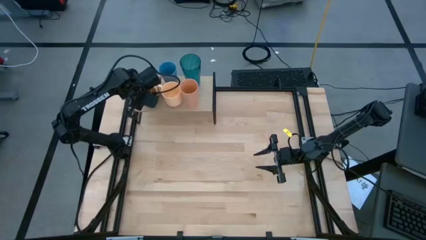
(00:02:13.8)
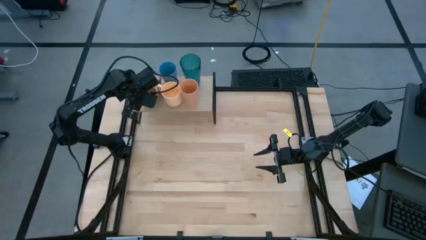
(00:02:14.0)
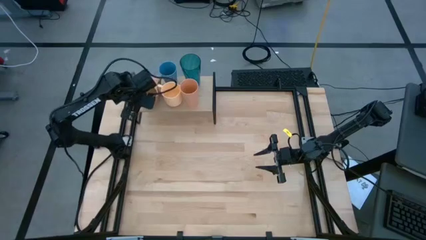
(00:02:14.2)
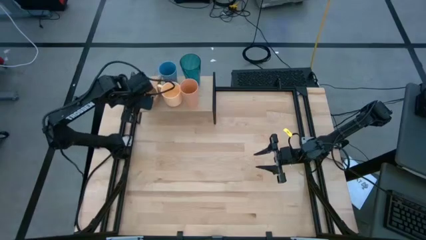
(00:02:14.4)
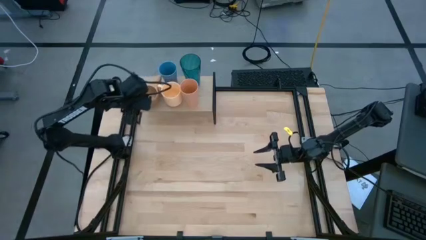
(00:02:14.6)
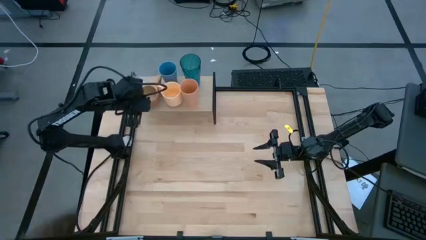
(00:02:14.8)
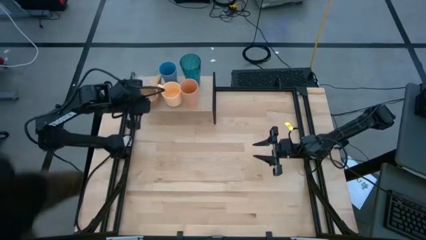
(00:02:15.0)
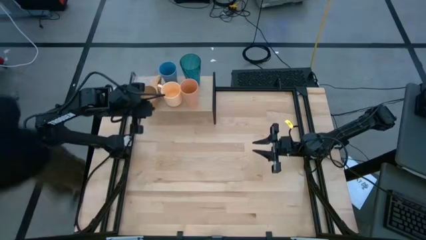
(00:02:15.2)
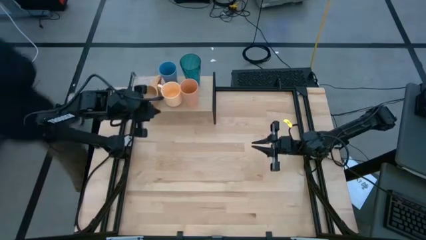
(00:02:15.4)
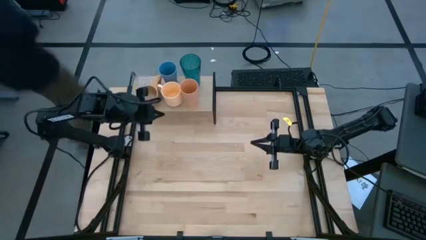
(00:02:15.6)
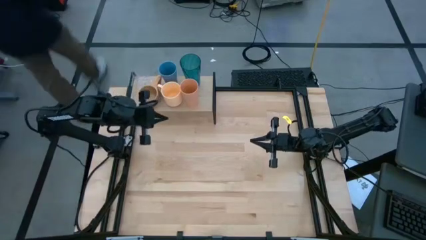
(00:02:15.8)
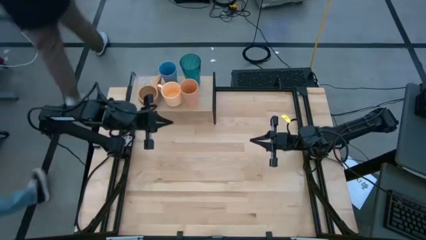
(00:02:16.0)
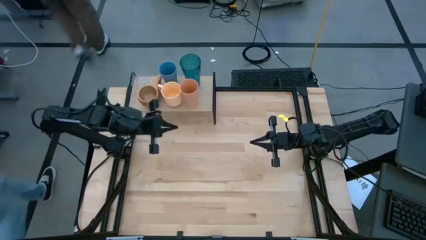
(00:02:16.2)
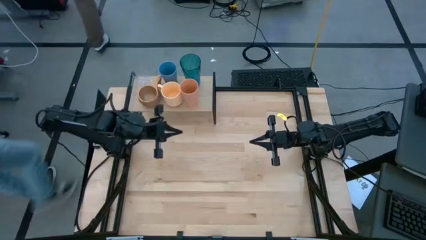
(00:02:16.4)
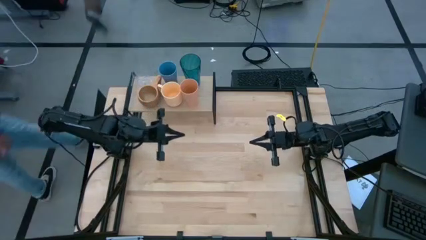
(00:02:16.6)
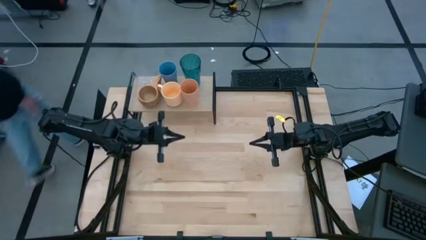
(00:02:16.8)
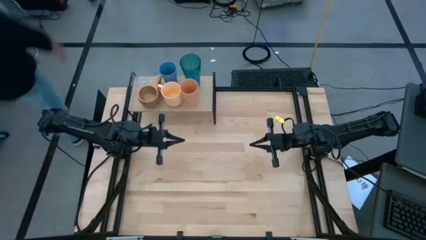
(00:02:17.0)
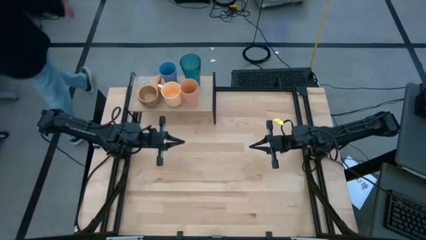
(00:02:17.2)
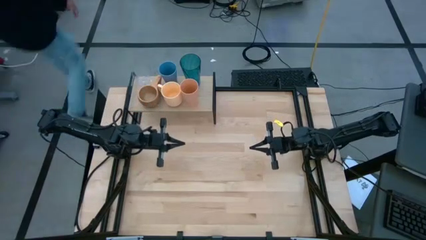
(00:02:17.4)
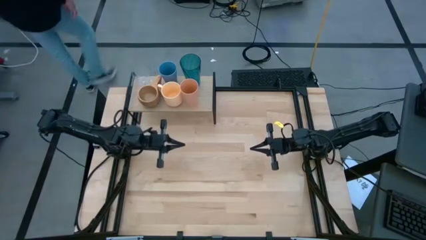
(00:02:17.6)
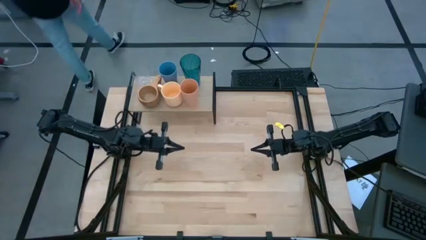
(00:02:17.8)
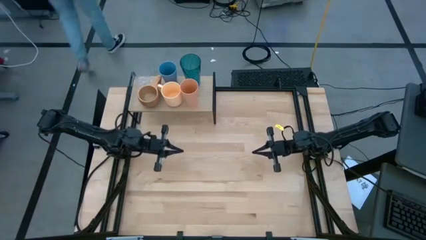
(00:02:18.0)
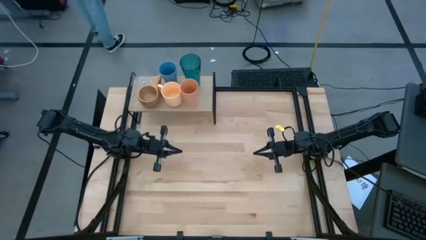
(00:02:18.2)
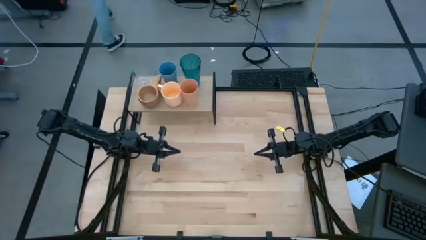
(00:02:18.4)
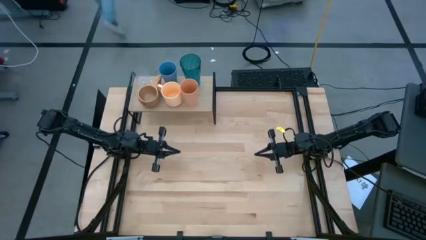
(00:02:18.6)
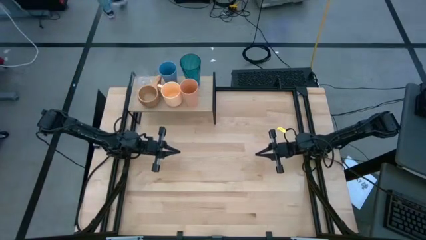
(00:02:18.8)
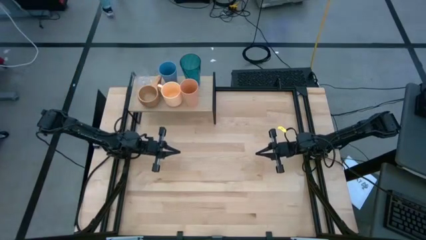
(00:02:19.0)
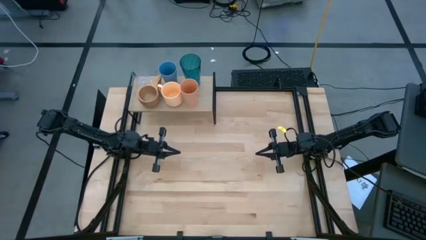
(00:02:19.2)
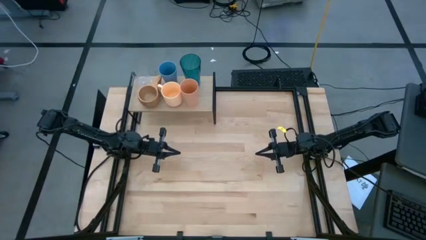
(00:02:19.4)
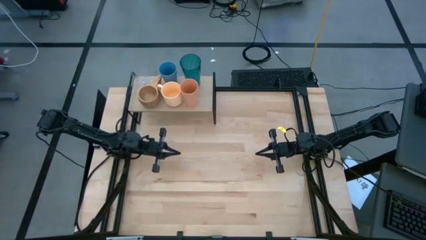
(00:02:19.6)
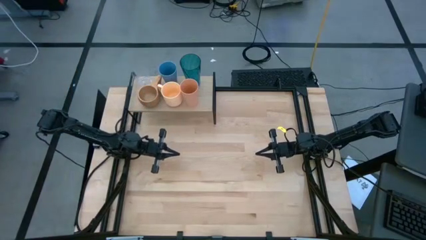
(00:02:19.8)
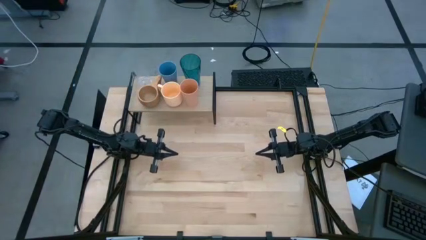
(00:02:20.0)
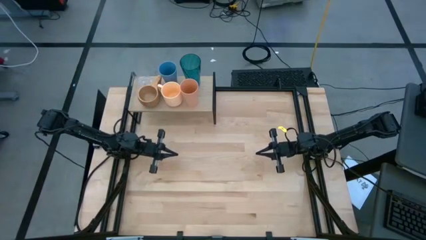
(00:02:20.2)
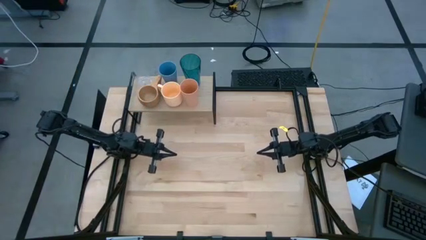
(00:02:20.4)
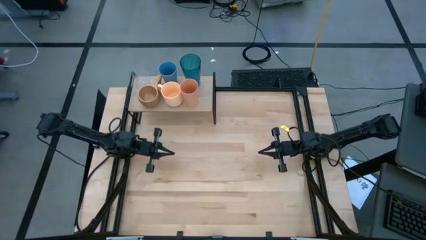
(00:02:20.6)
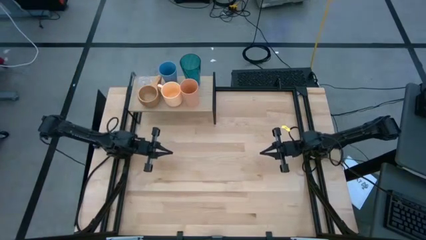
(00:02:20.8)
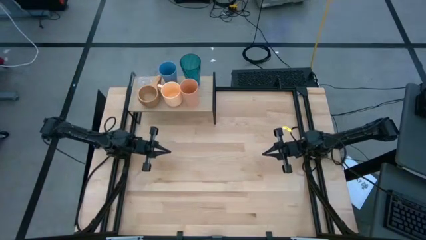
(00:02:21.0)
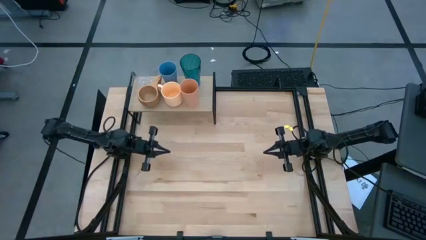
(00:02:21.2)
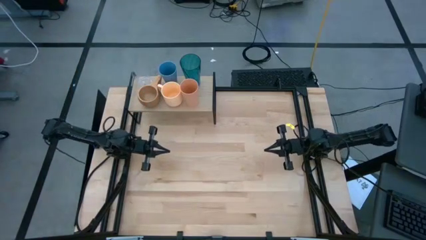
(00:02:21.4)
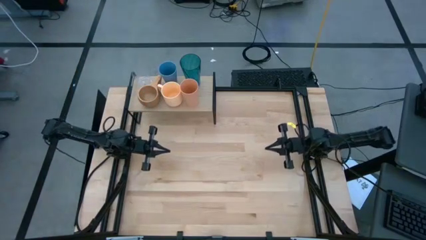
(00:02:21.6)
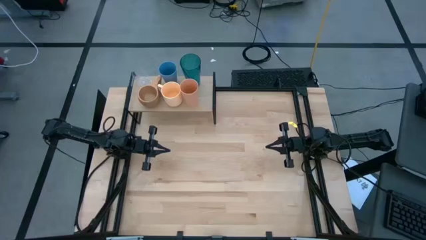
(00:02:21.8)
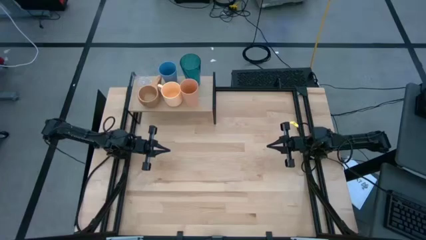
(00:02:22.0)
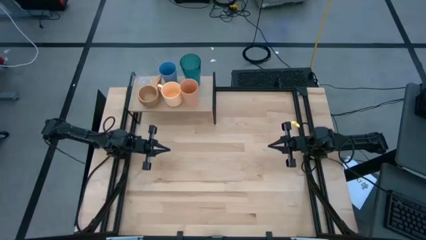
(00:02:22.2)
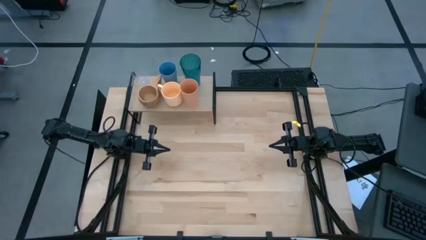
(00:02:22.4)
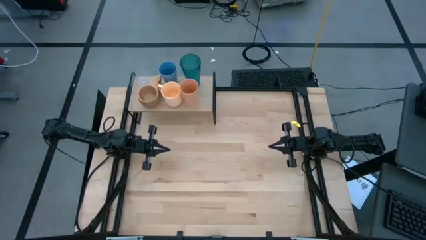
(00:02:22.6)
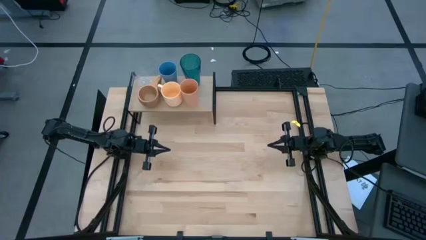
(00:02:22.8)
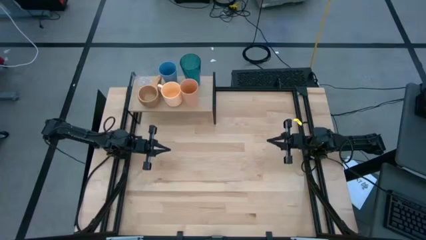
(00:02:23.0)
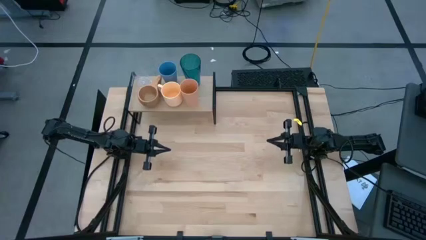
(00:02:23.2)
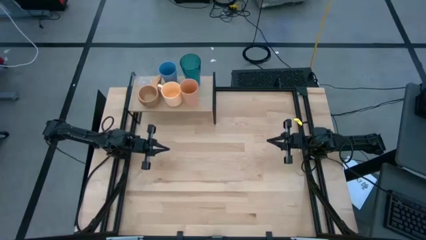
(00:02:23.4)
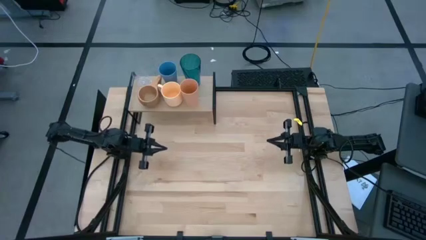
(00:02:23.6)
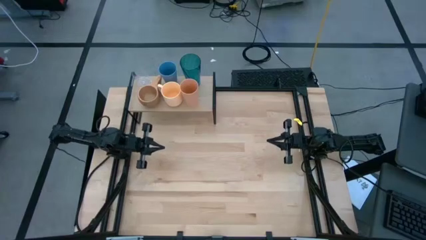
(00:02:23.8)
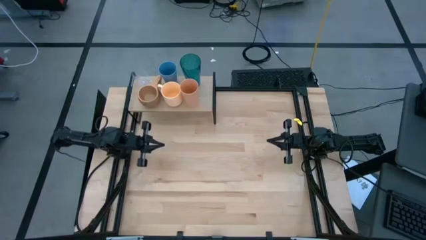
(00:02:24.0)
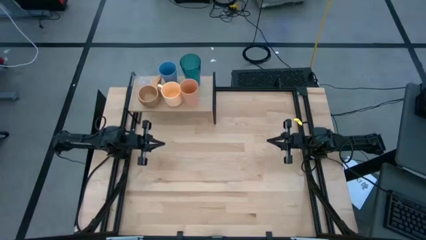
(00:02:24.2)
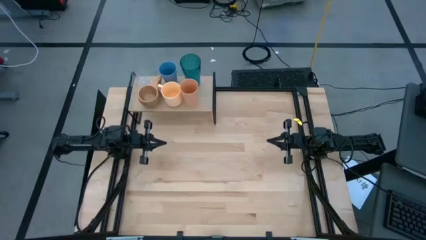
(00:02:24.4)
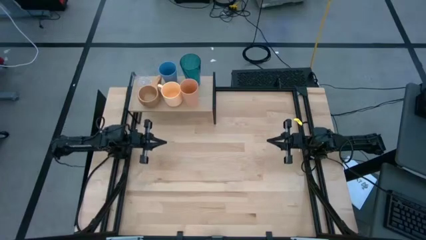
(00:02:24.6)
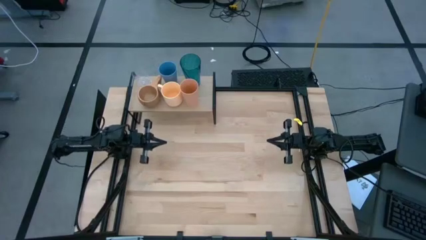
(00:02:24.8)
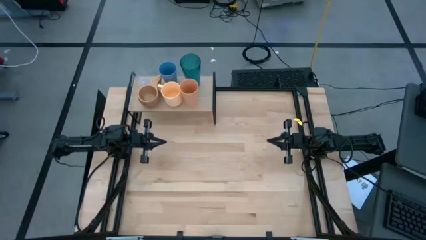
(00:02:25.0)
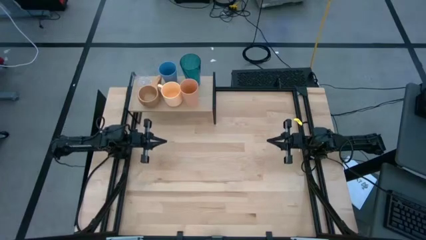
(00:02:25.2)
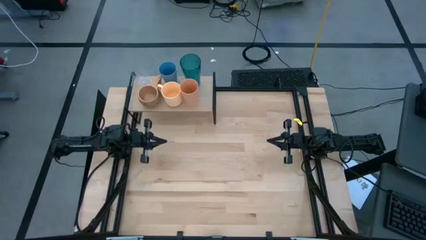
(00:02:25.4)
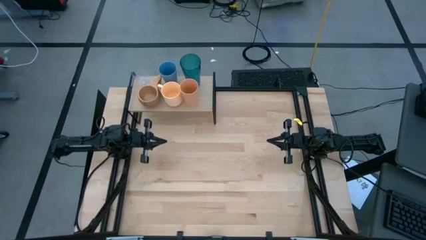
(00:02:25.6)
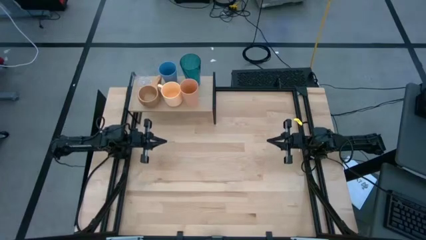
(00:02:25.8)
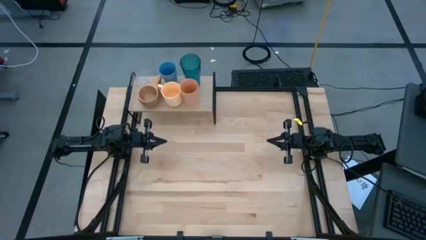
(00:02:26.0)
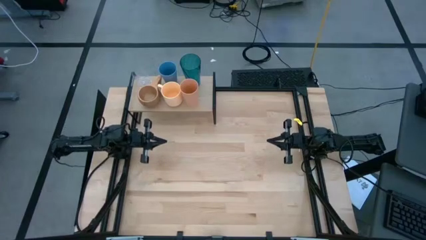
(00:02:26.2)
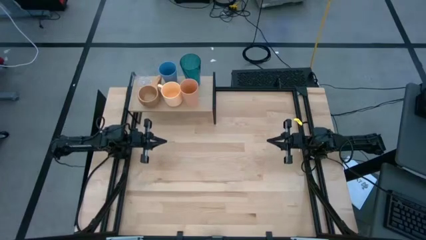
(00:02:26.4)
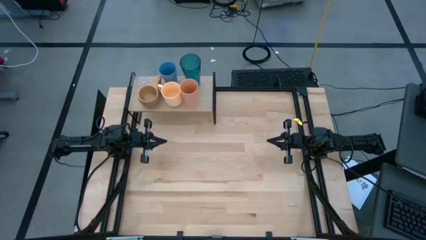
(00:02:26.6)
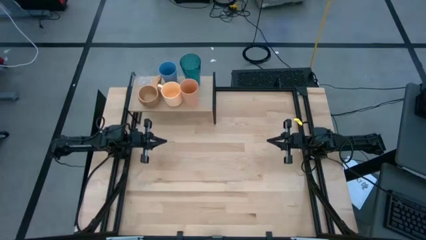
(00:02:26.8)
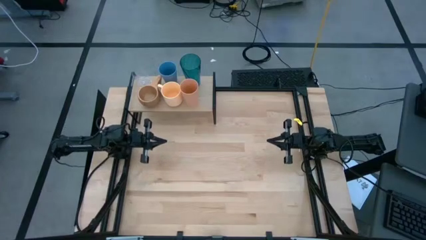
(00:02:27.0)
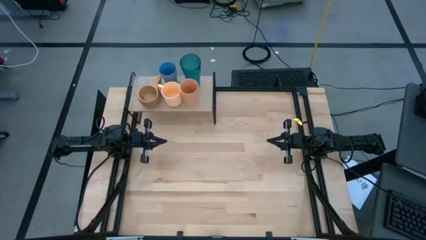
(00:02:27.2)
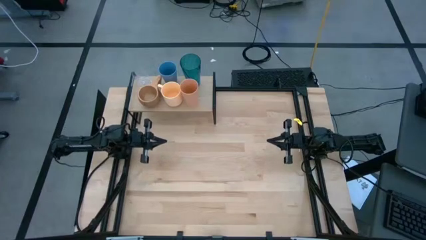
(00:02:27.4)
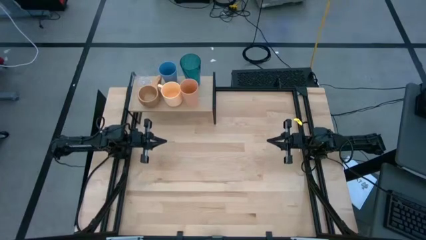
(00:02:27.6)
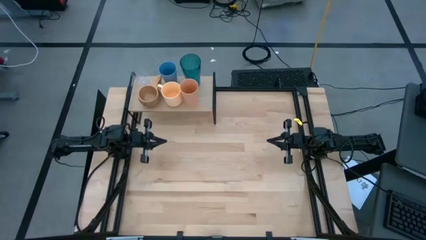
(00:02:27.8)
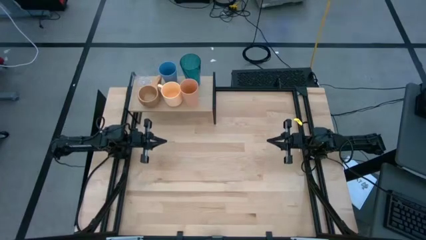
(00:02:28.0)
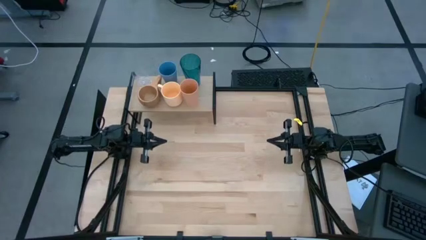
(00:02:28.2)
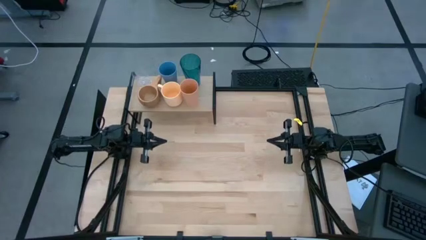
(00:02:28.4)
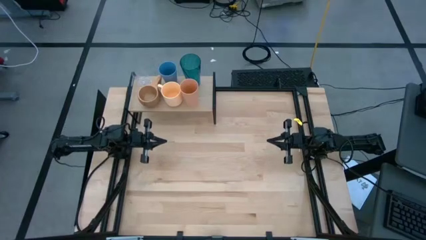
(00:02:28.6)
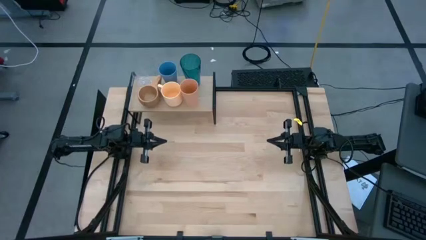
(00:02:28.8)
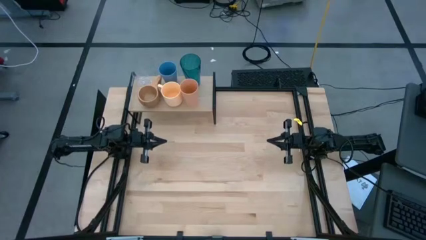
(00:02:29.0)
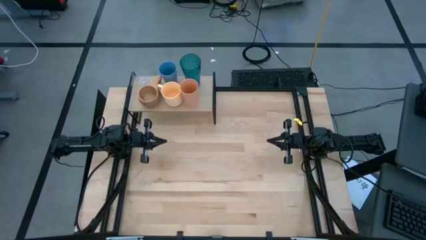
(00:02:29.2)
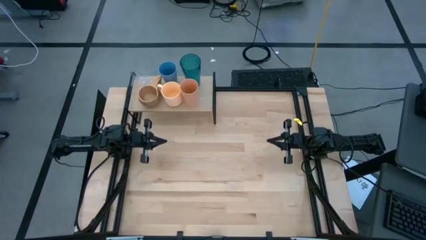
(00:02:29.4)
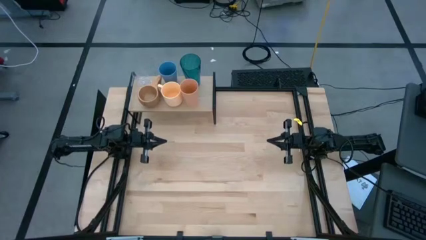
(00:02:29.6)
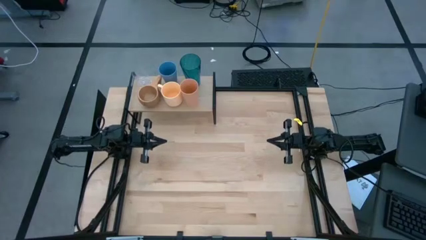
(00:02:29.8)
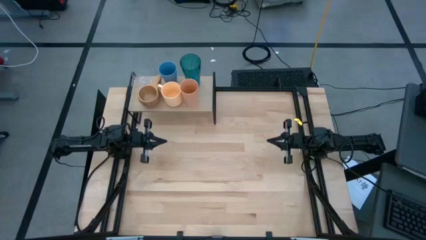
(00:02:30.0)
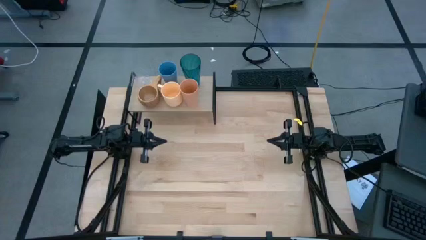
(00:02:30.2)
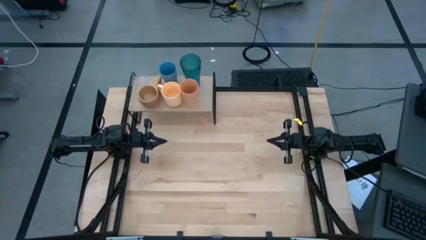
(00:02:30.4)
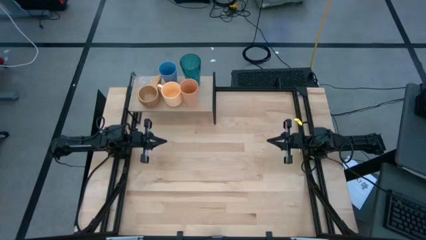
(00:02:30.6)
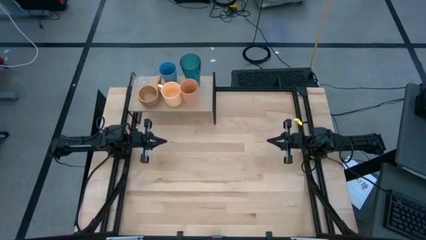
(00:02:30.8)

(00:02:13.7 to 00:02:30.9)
Task: Stack small to large cups/mugs on shelf
Return to Home Position
